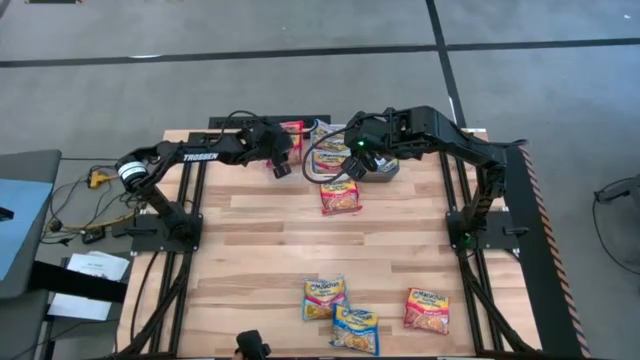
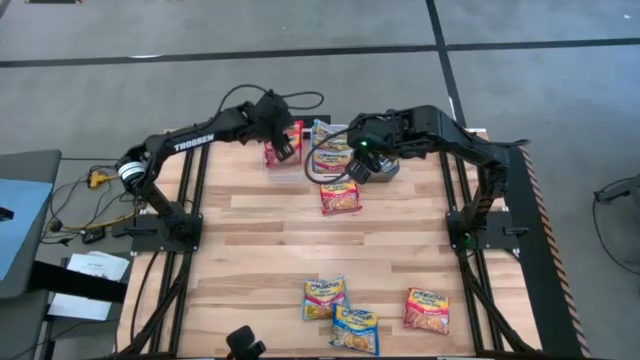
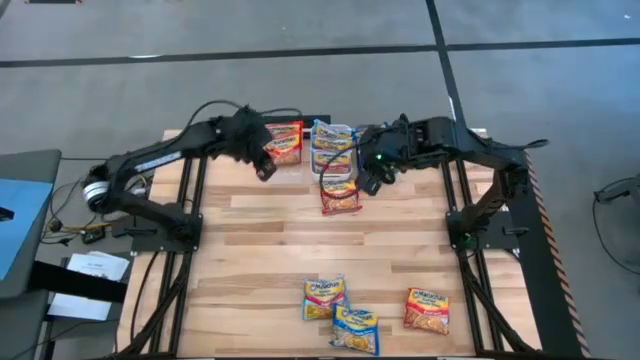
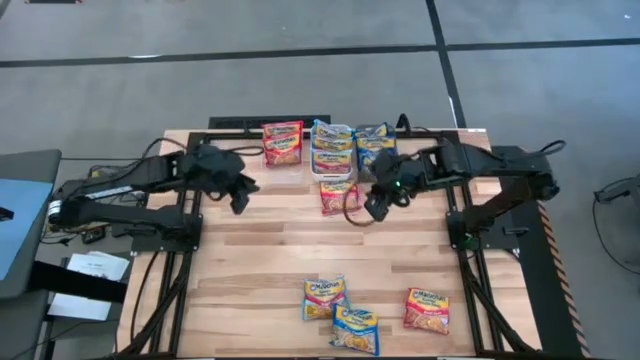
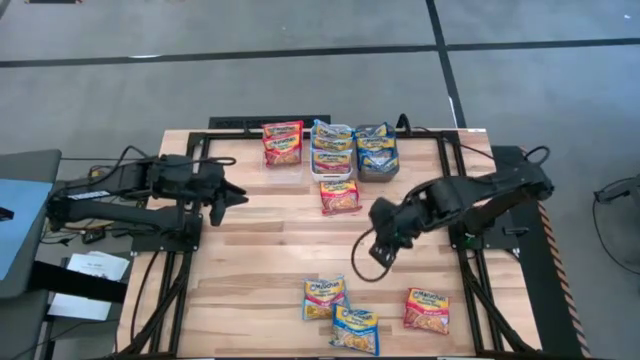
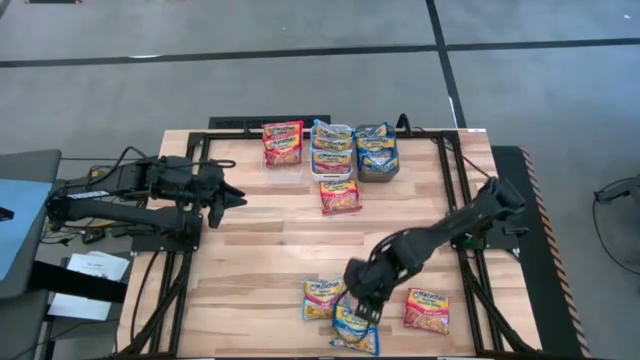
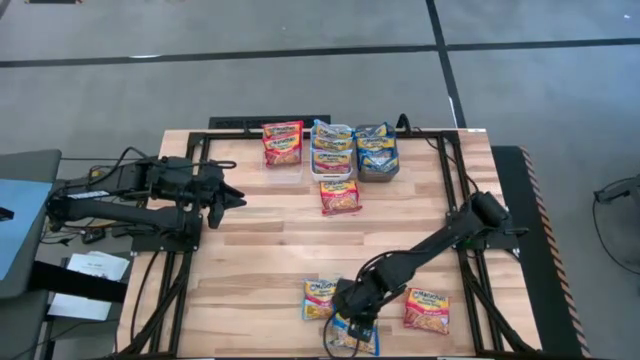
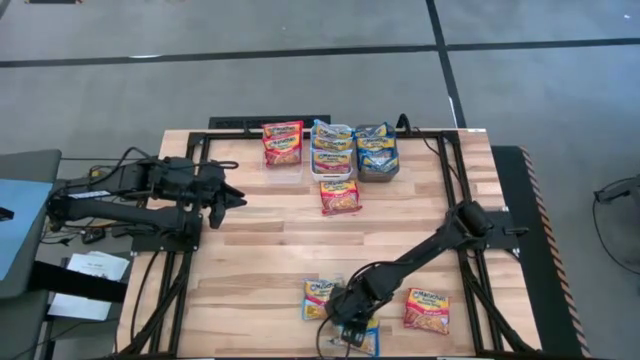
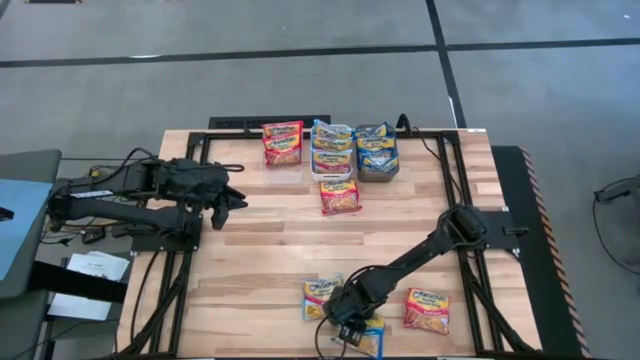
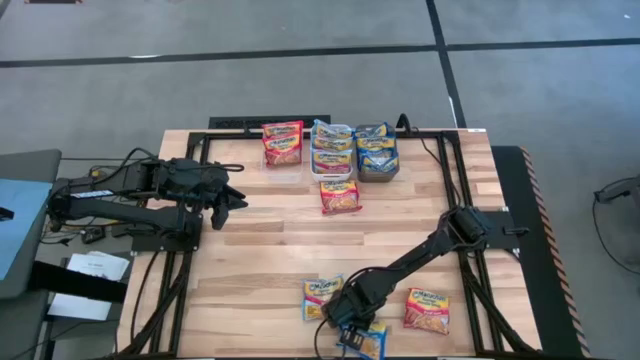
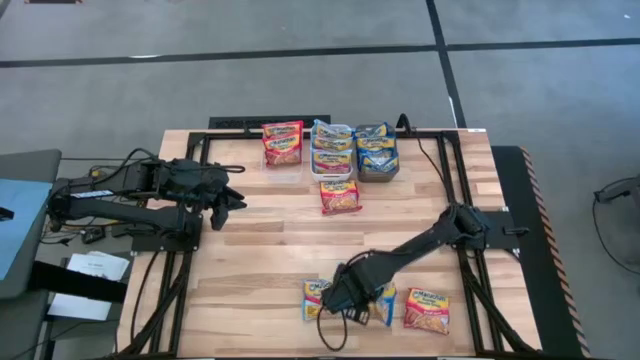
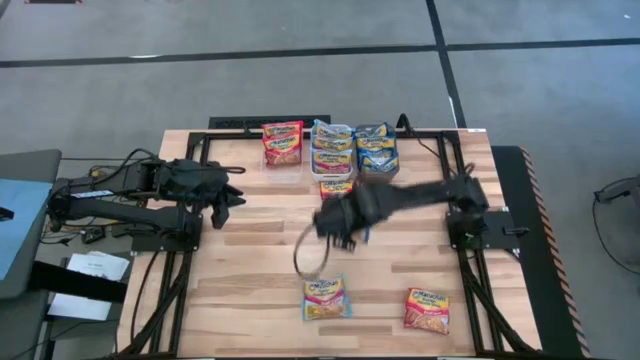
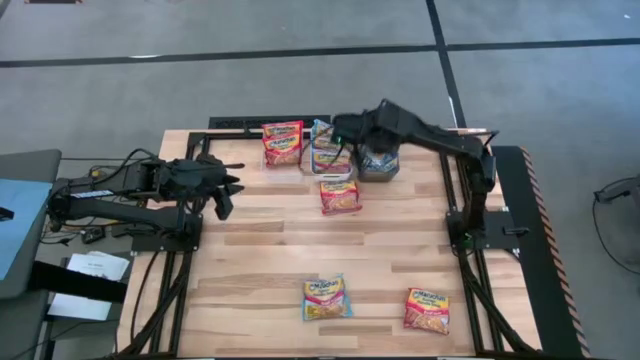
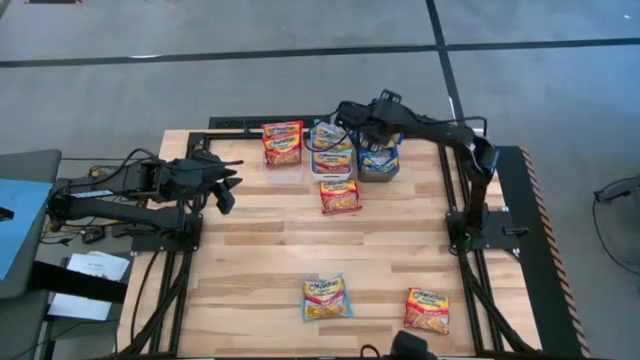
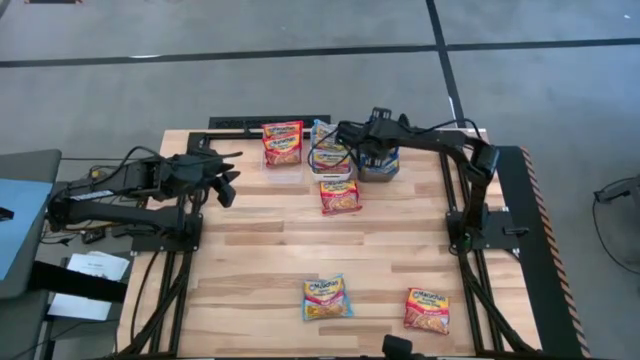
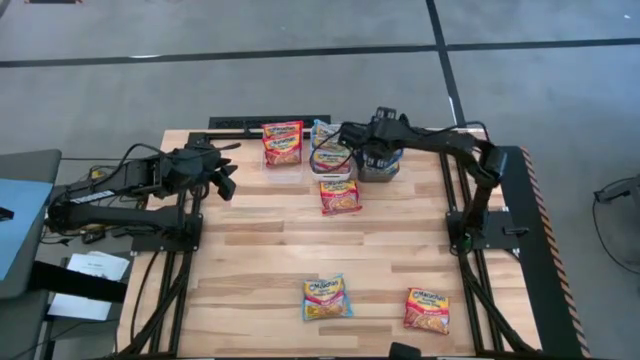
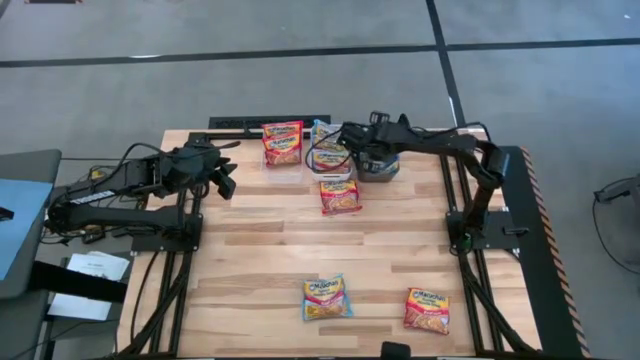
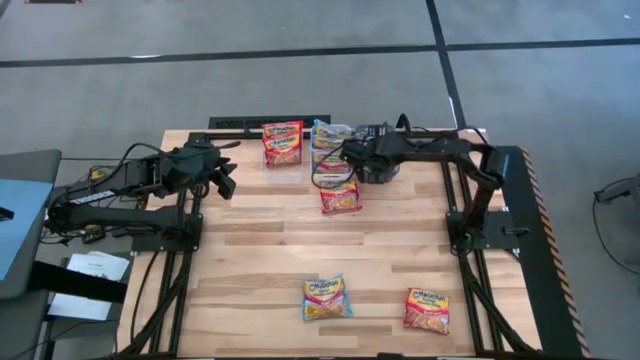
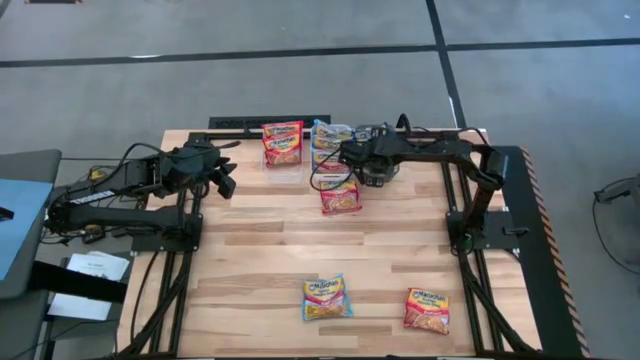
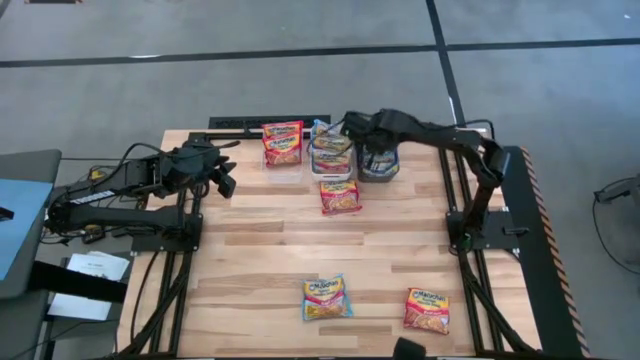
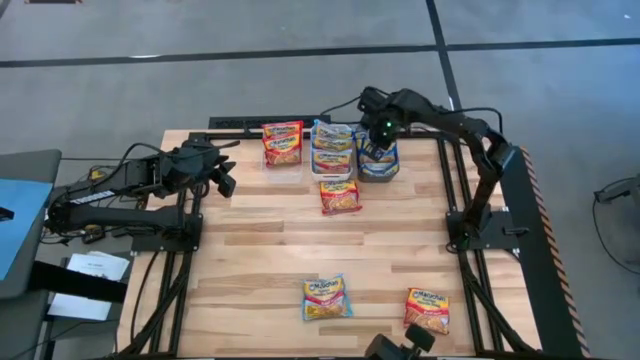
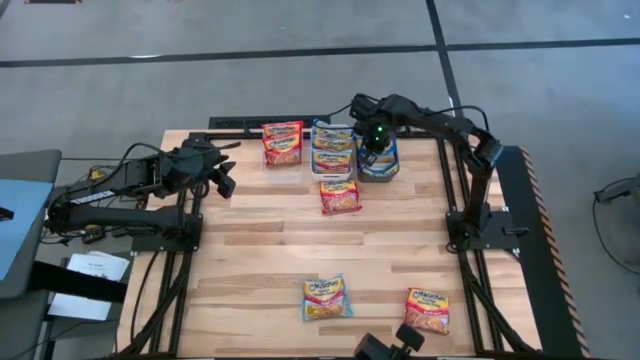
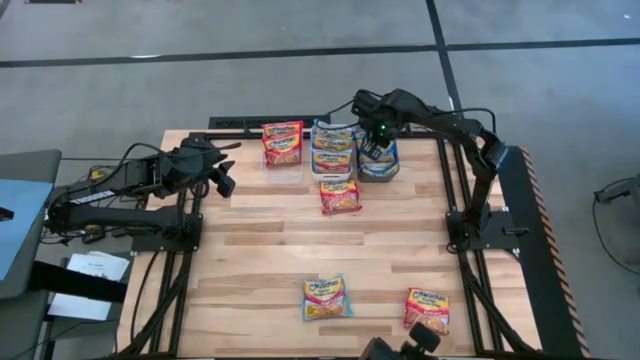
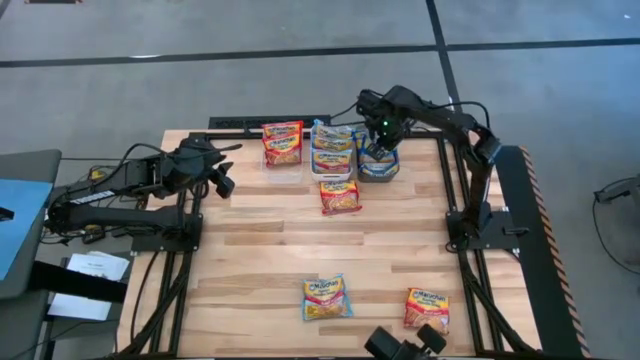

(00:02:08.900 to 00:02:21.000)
Task: Sort Maruchan noodles
Put the noodle pack into the black bin

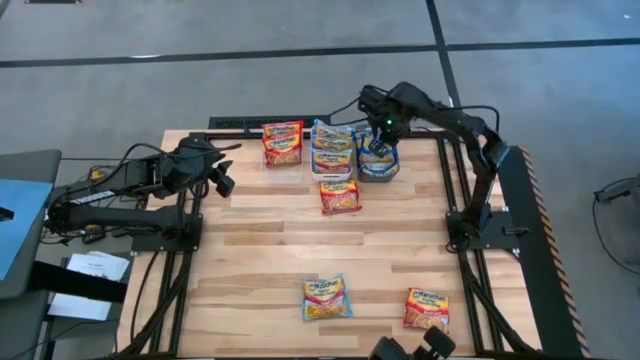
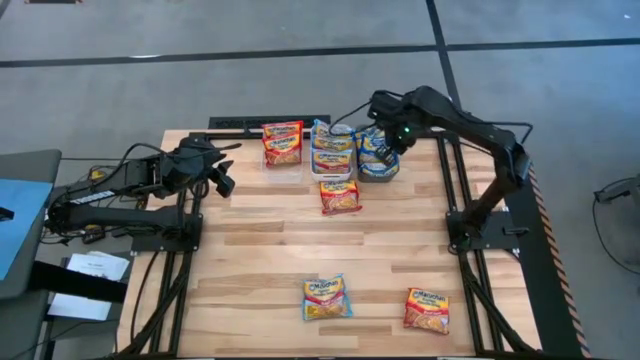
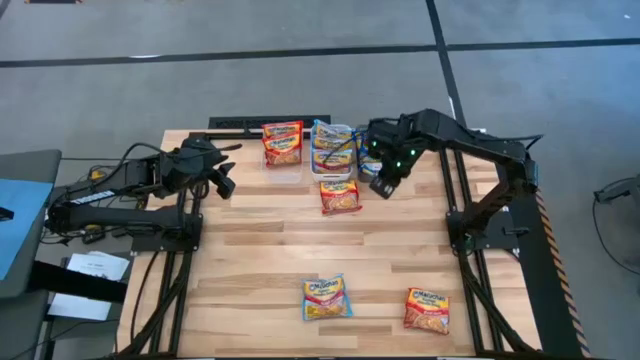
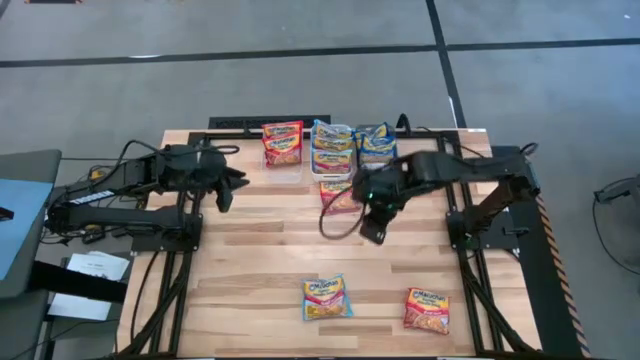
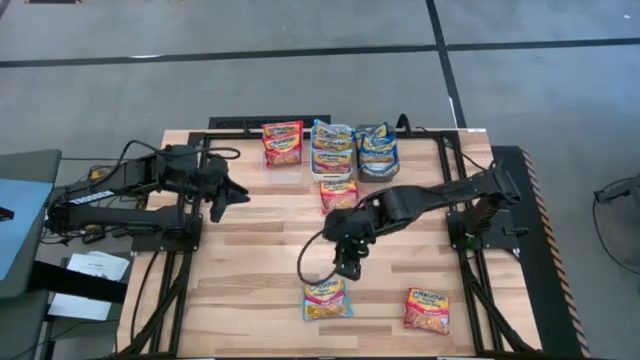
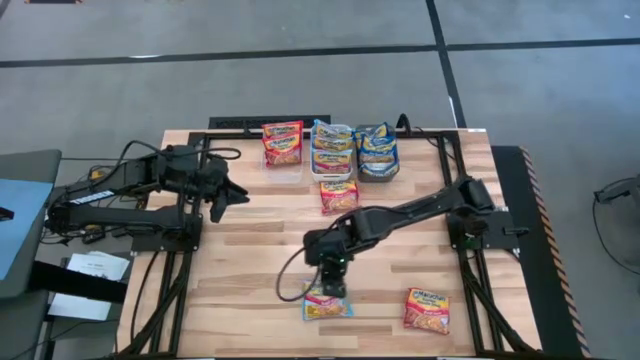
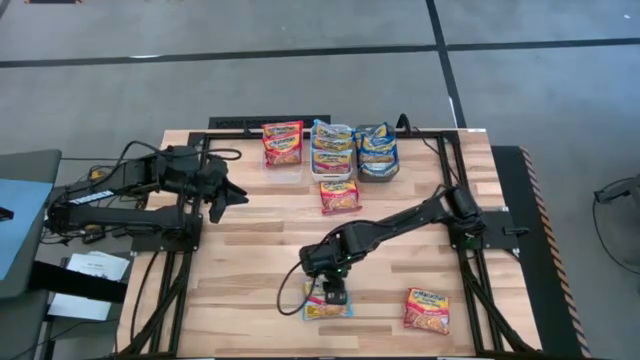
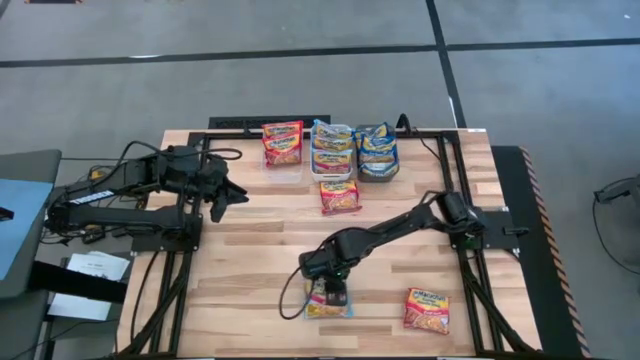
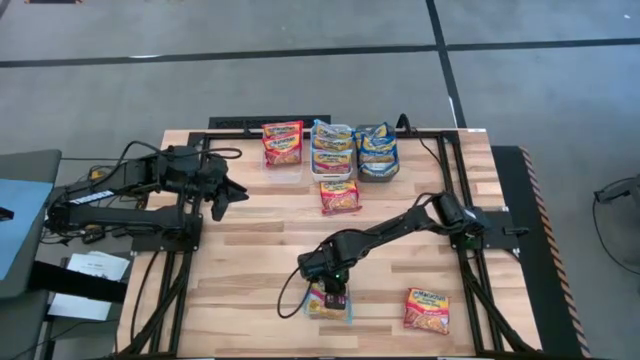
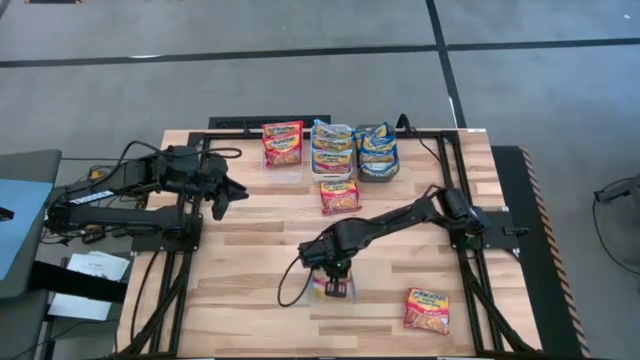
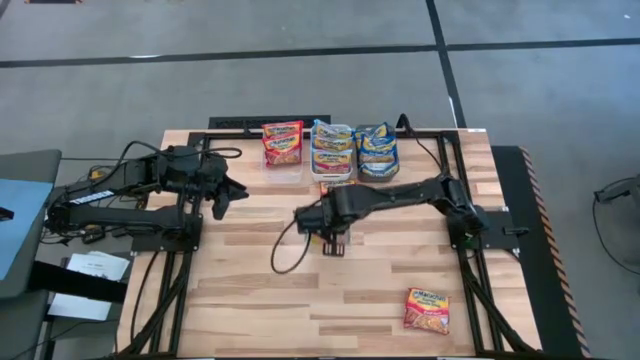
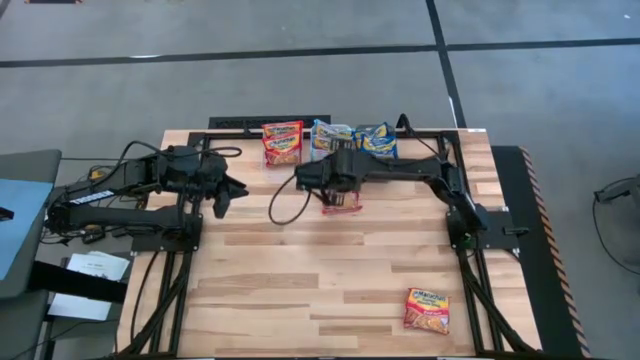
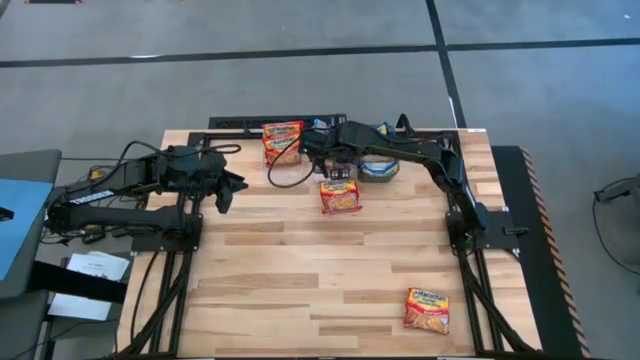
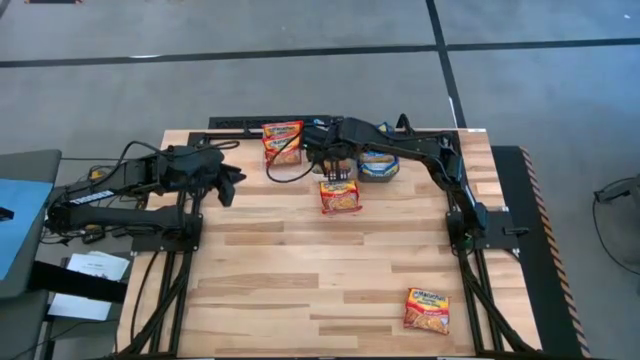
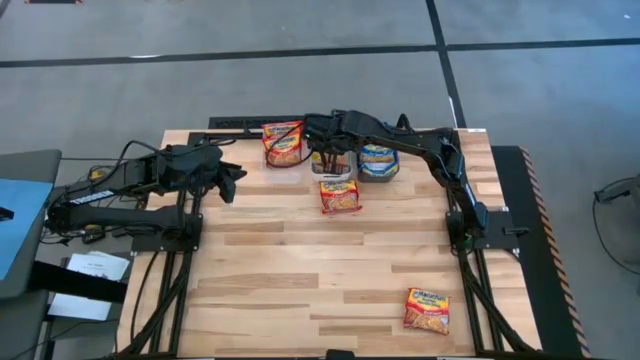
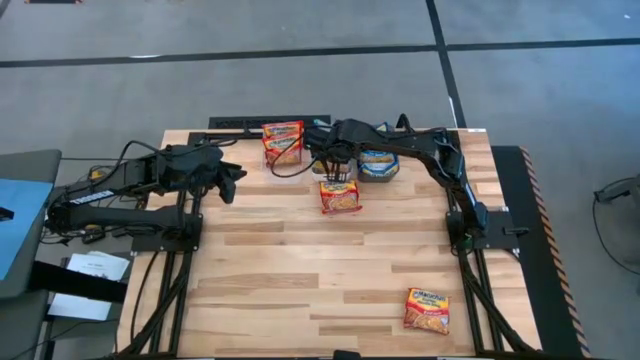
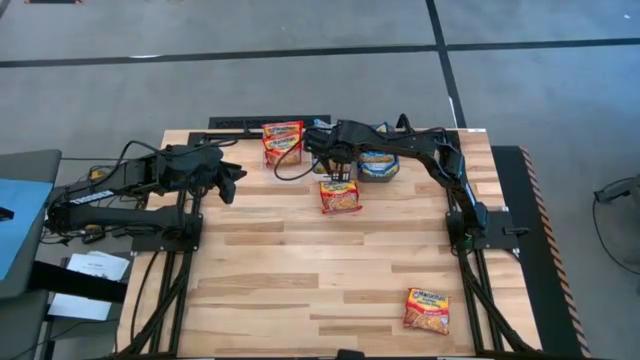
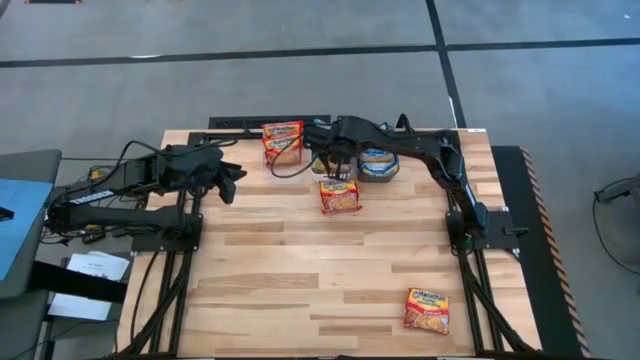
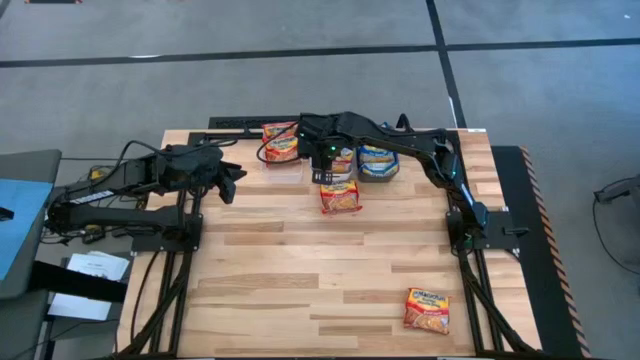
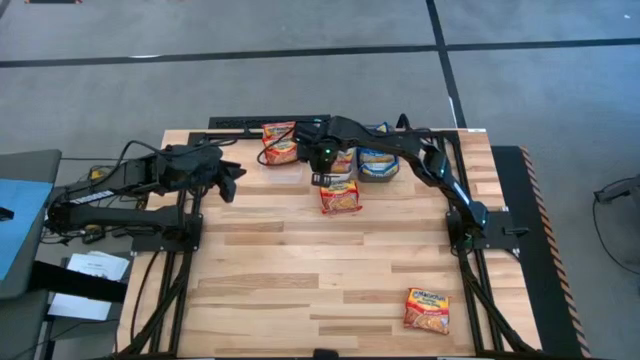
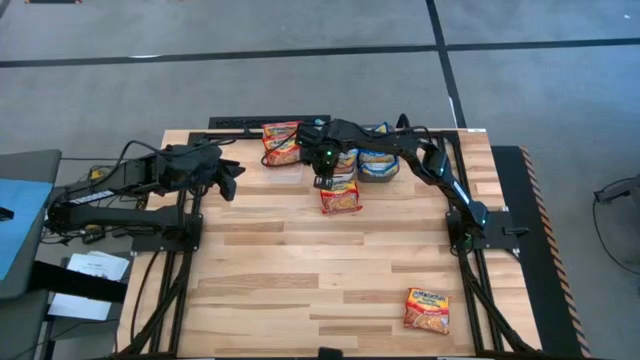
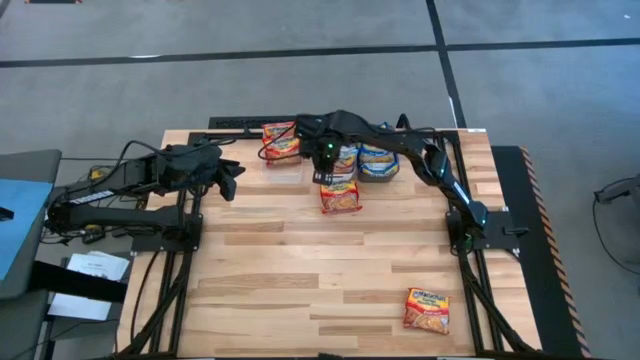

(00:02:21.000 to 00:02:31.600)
Put the light blue noodle pack into the white bin
